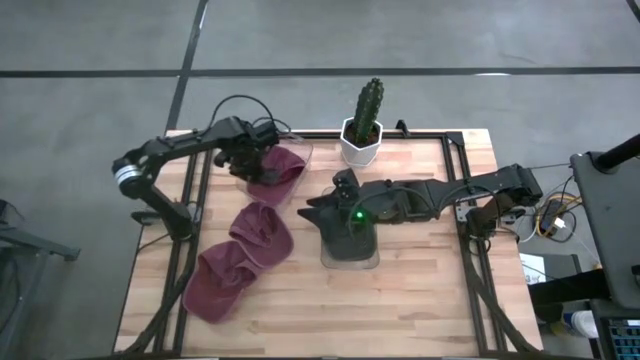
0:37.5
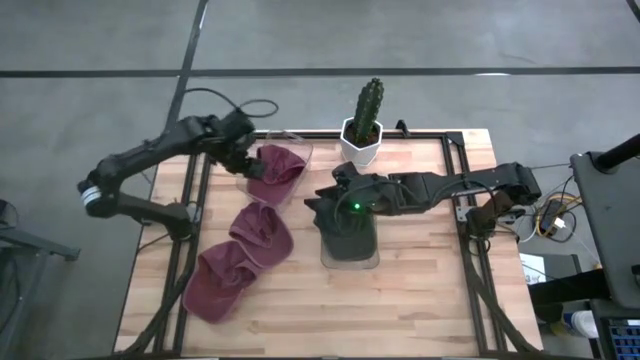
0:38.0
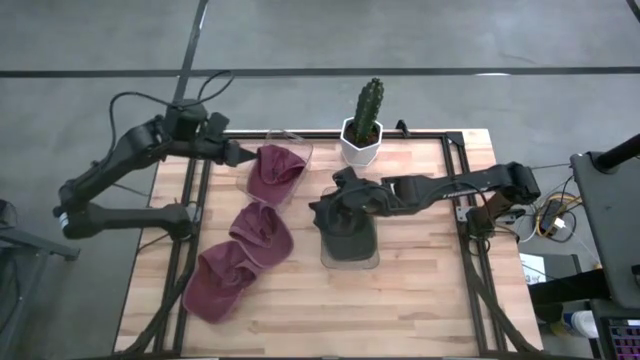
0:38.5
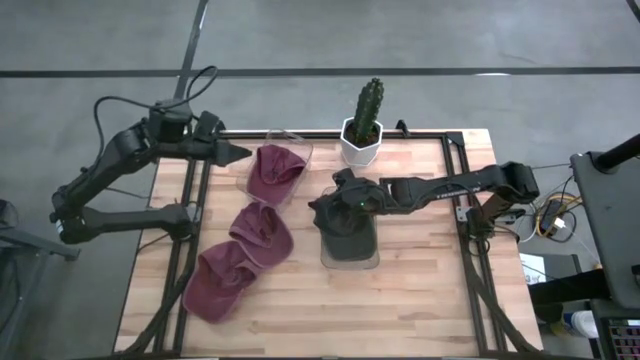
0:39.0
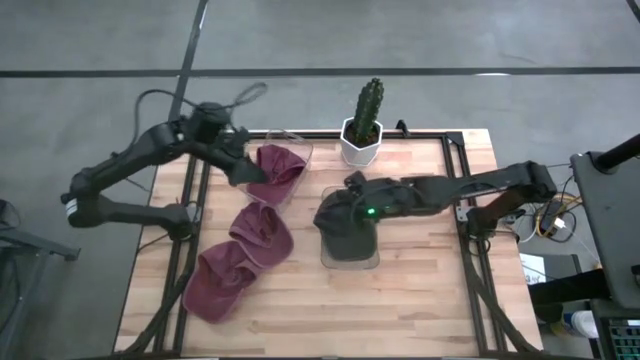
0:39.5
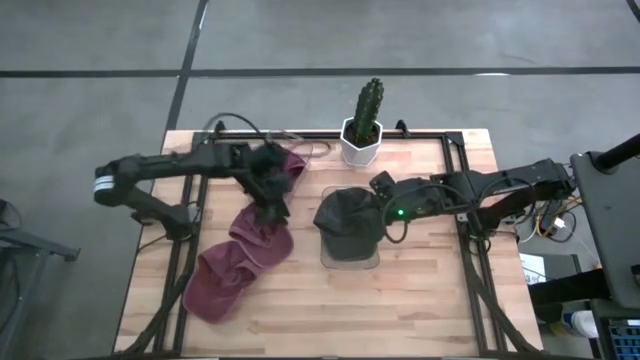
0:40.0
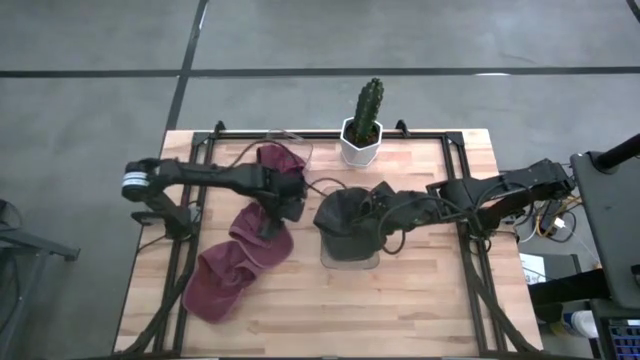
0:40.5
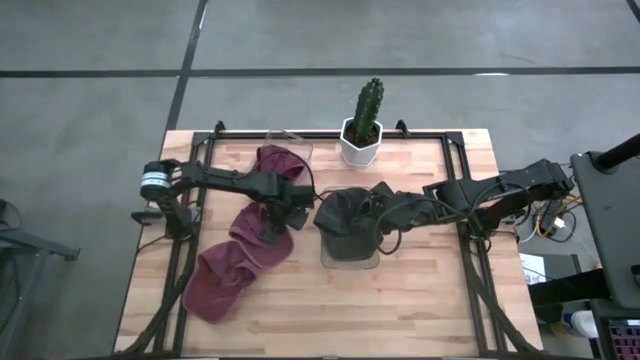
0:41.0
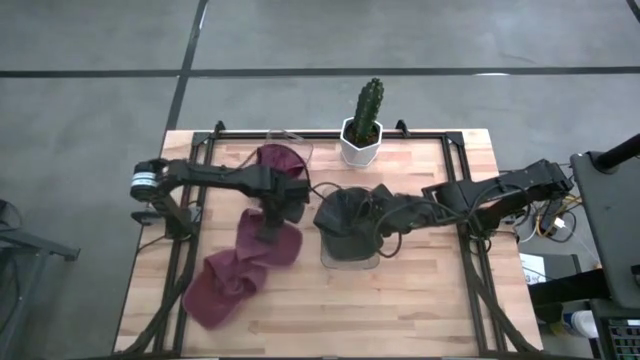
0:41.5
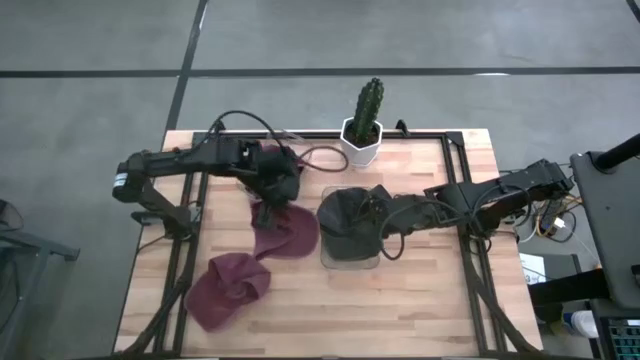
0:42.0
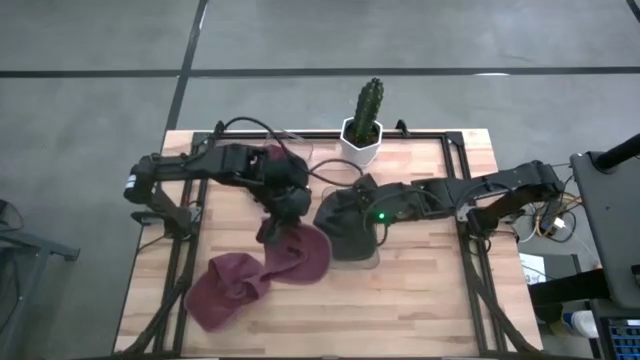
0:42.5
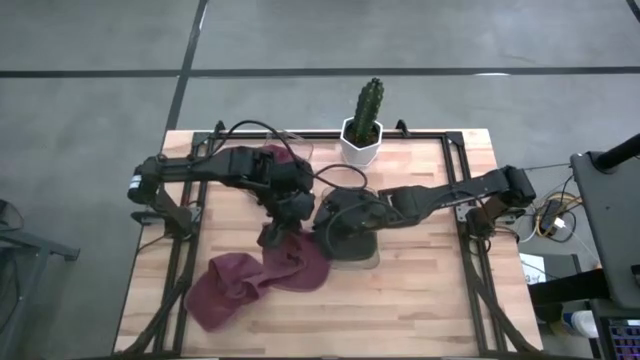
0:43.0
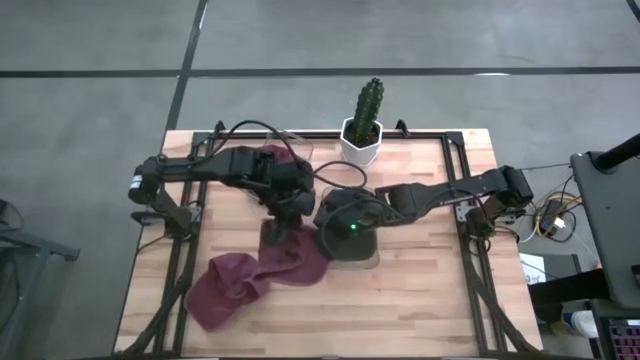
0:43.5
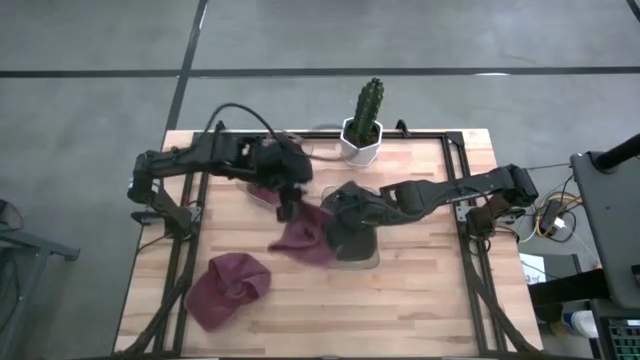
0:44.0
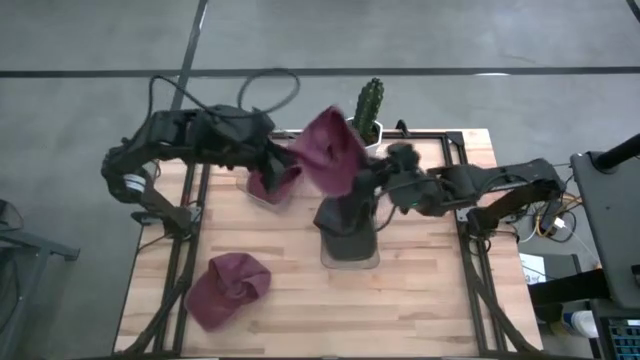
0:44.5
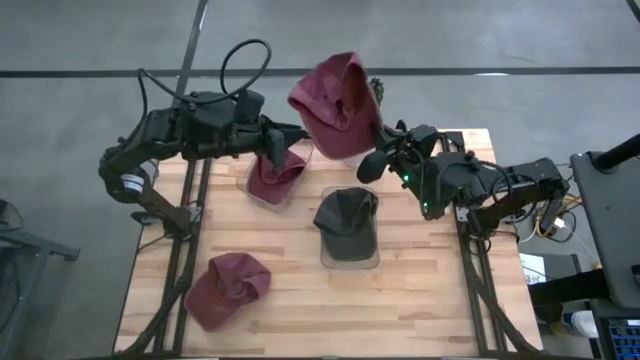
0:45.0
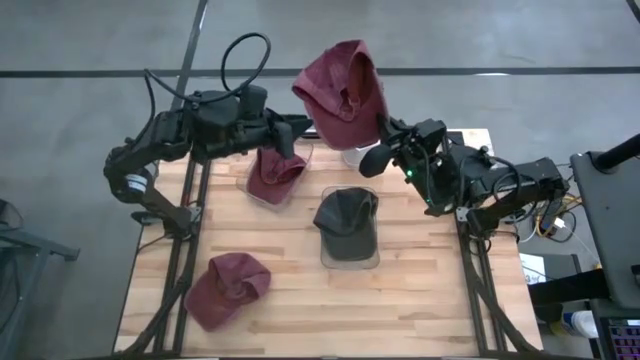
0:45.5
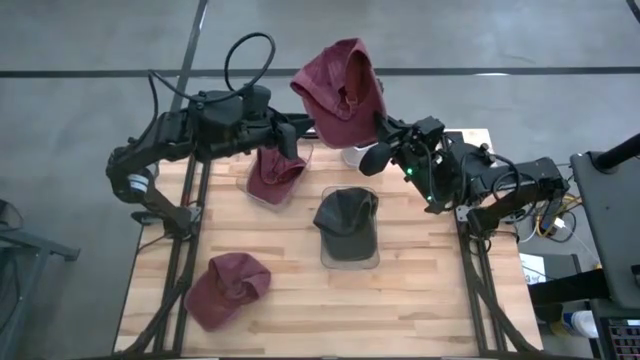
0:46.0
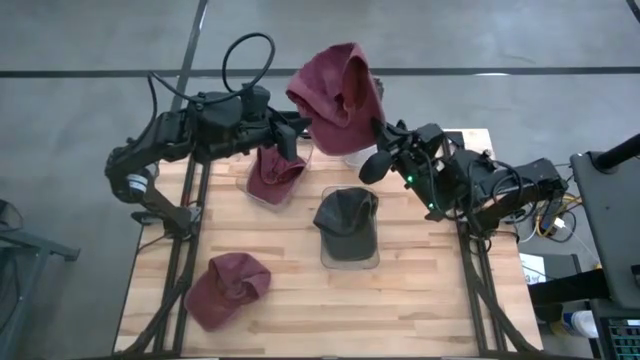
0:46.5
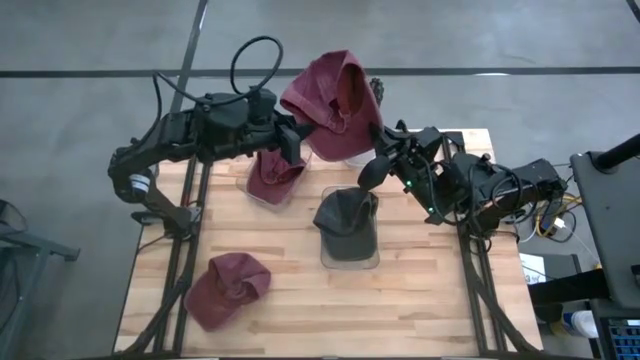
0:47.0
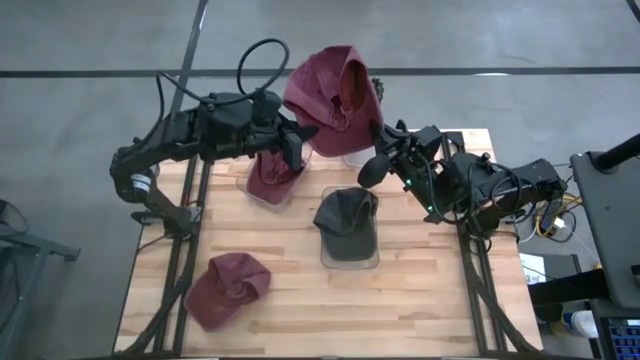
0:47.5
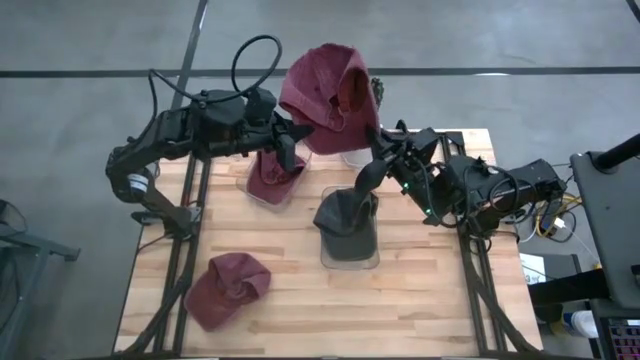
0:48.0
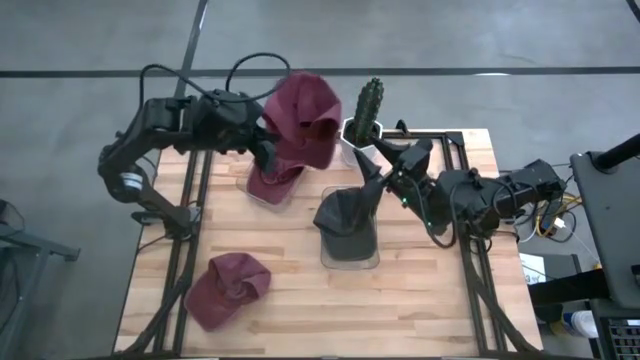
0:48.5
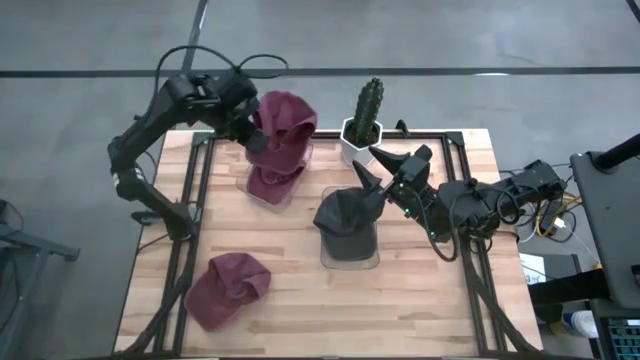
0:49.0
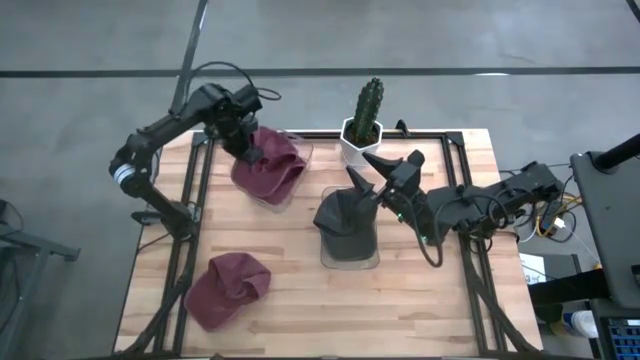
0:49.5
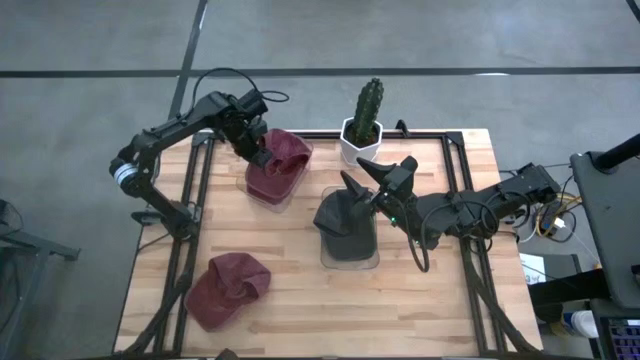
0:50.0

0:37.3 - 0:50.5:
Task: Pick & Place hat
Put the top red cap into the top transparent bin

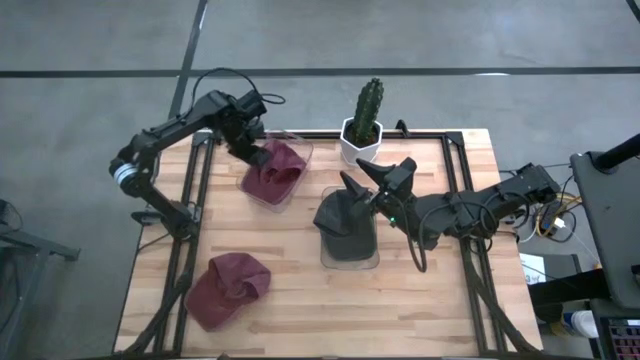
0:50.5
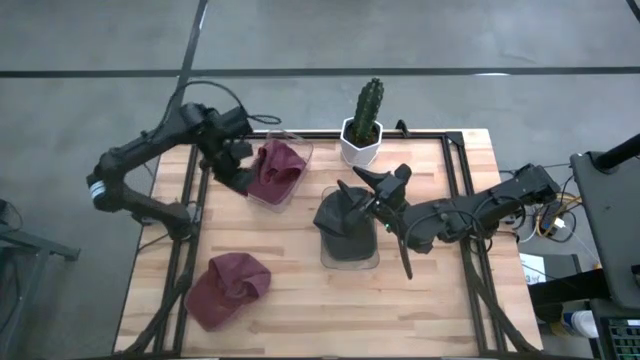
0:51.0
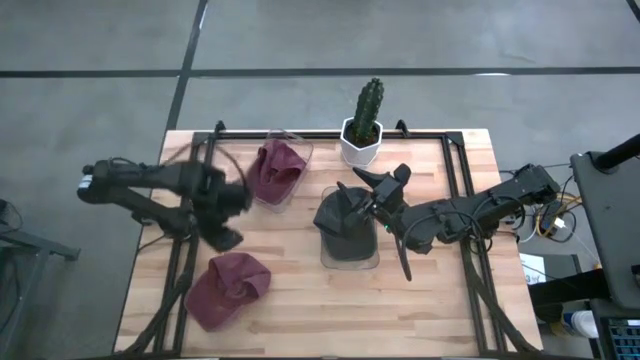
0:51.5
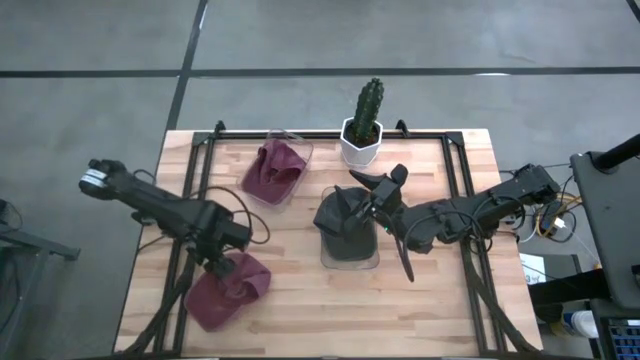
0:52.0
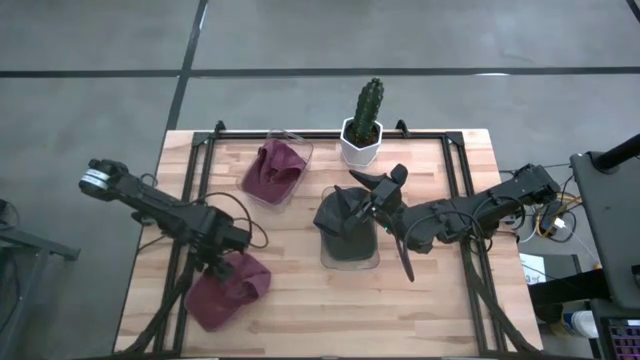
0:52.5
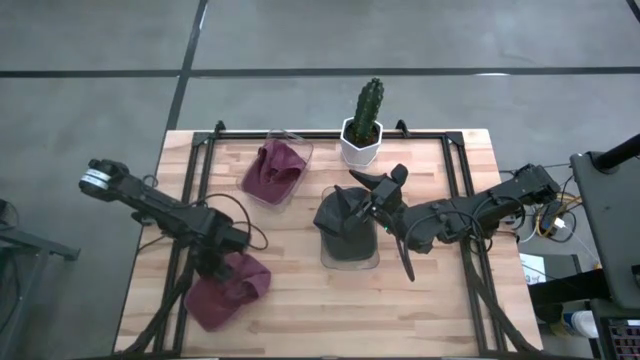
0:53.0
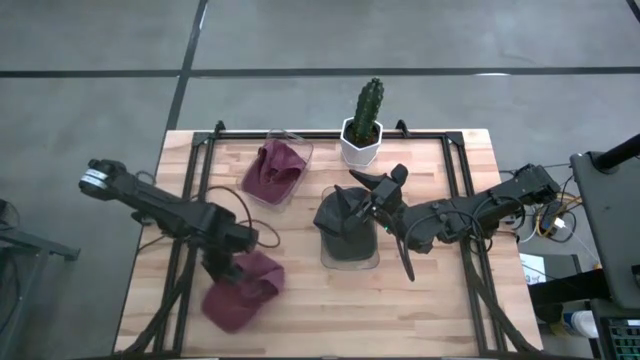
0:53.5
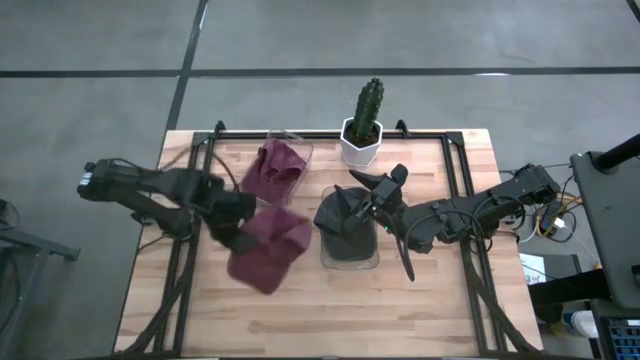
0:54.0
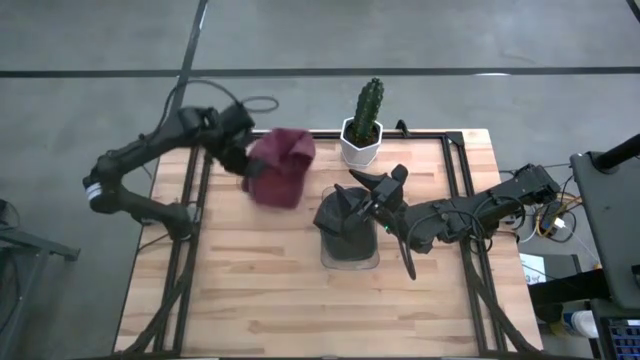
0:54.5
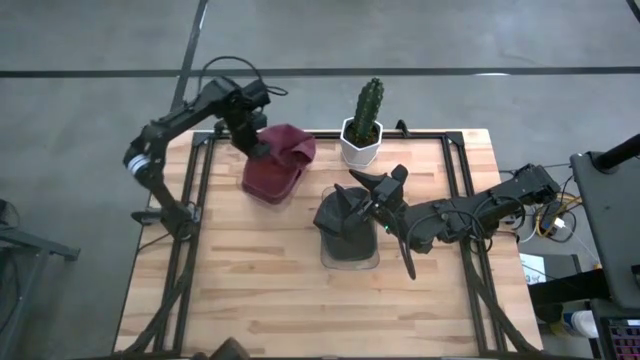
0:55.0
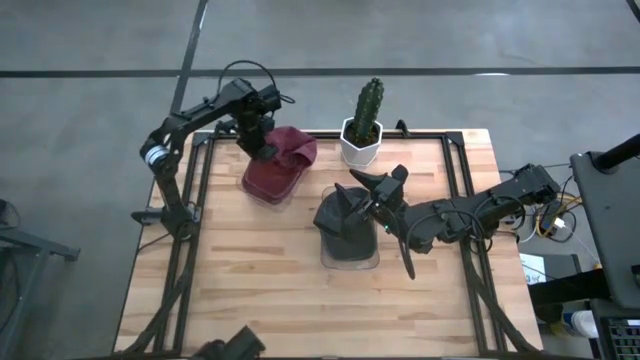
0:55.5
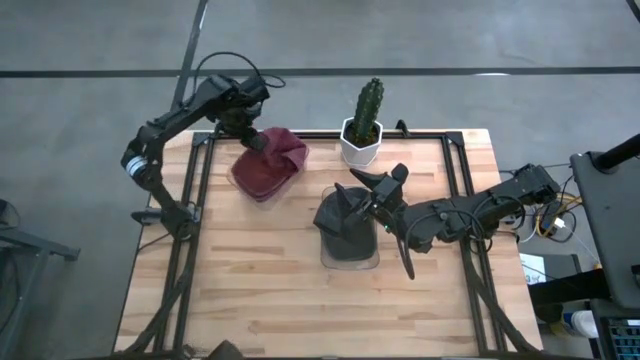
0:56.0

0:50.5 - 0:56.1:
Put the red cap into the top transparent bin

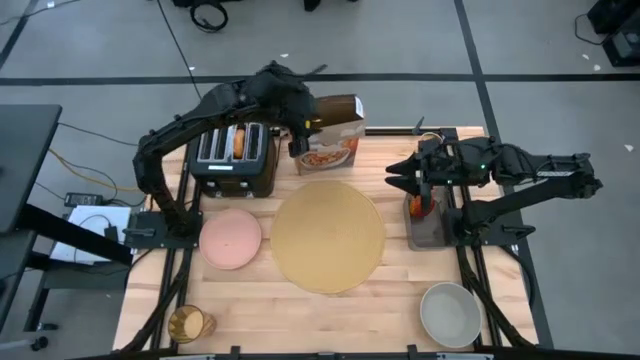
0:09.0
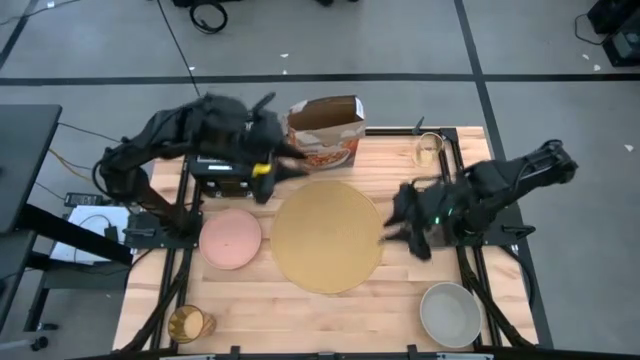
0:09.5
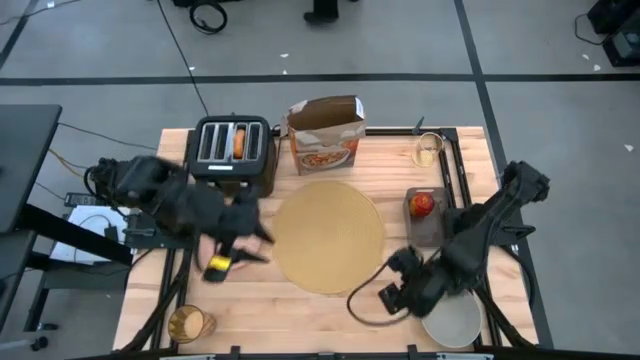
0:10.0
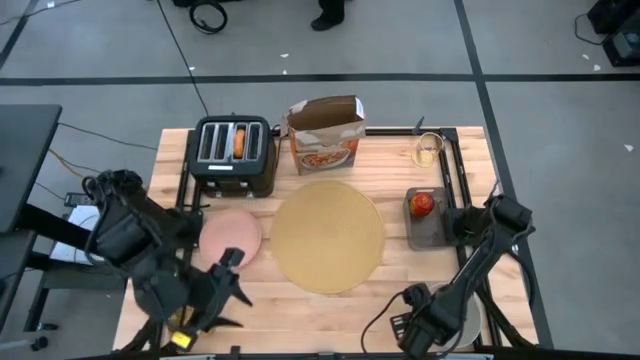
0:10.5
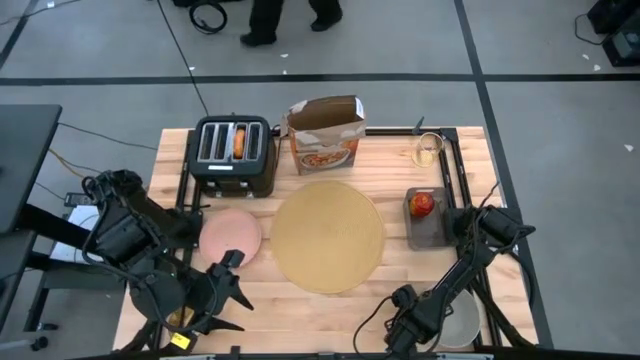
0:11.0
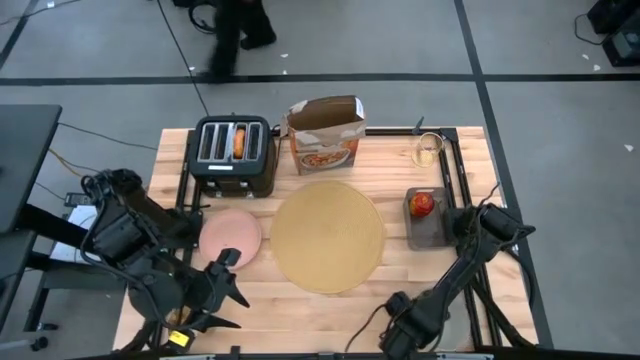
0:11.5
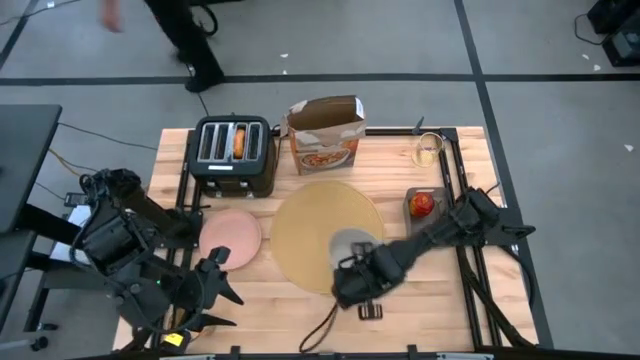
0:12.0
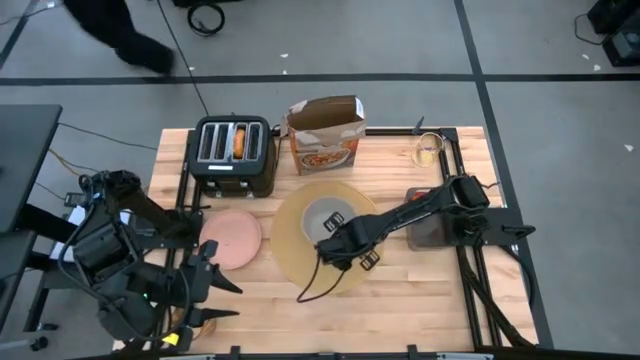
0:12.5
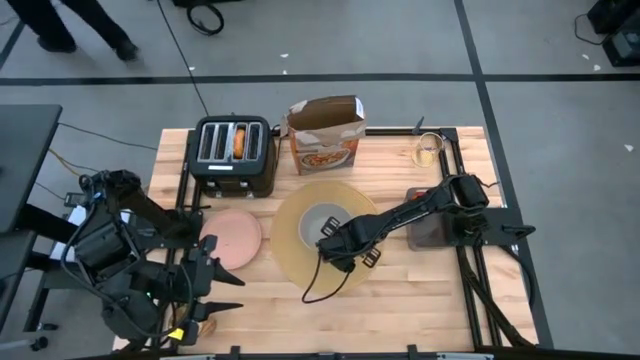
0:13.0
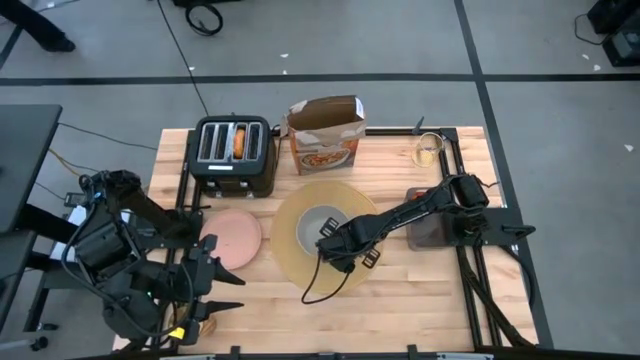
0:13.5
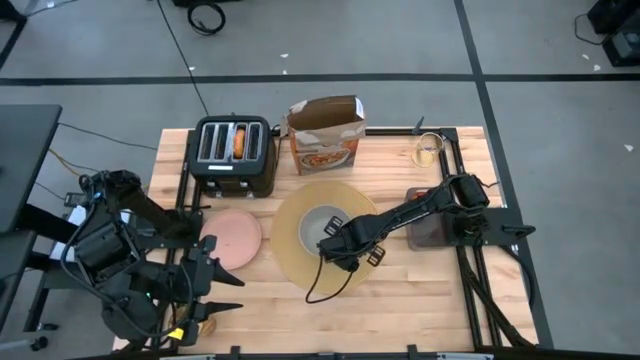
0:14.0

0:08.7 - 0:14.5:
Task: Arrange a breakfast setting
Put the gray bowl on the brown table mat
